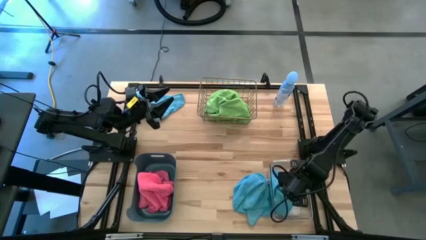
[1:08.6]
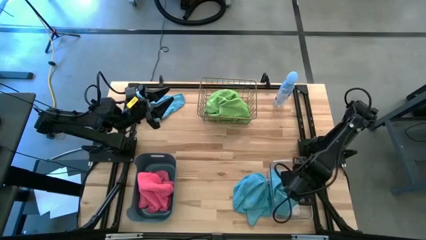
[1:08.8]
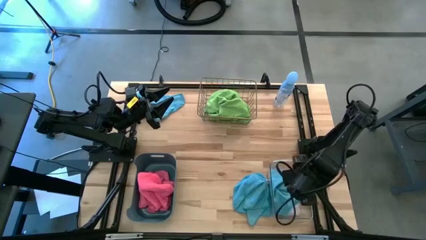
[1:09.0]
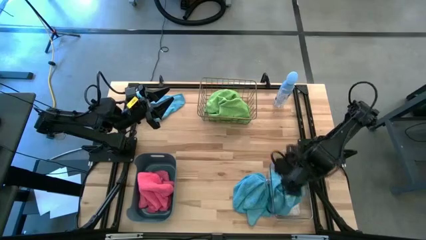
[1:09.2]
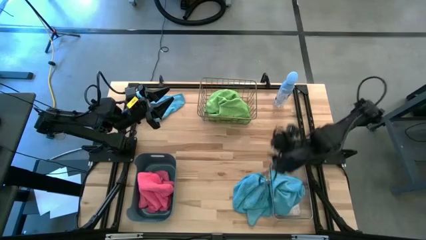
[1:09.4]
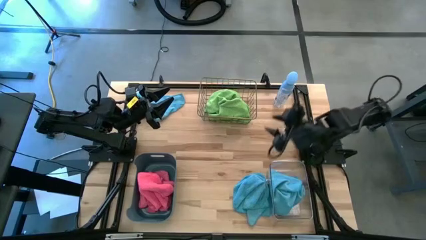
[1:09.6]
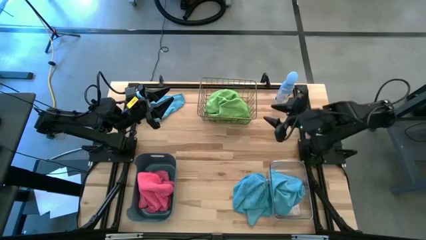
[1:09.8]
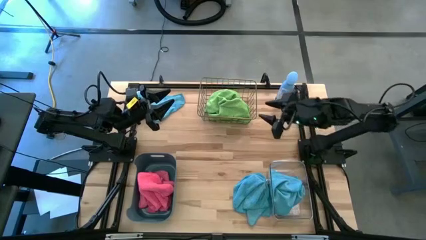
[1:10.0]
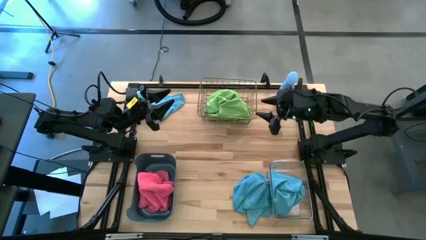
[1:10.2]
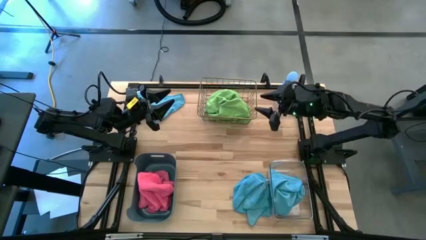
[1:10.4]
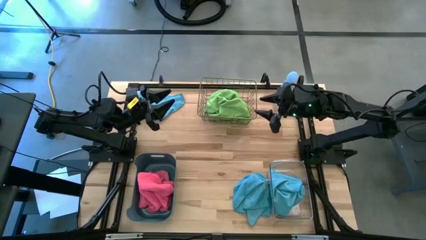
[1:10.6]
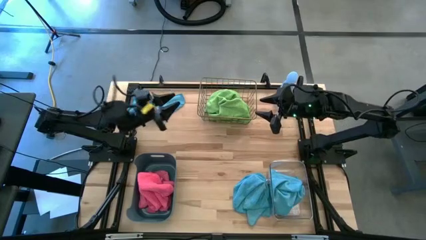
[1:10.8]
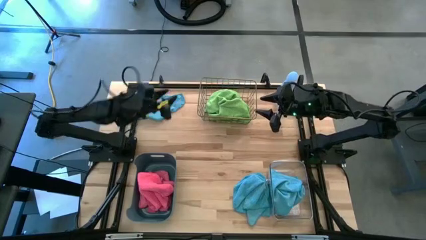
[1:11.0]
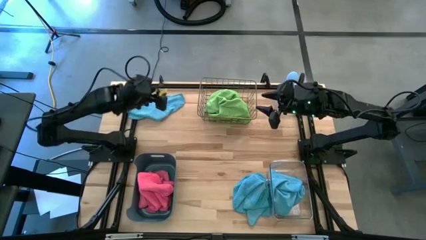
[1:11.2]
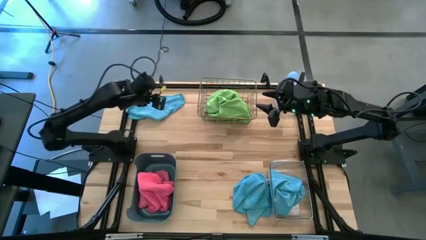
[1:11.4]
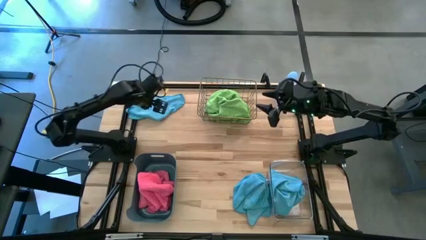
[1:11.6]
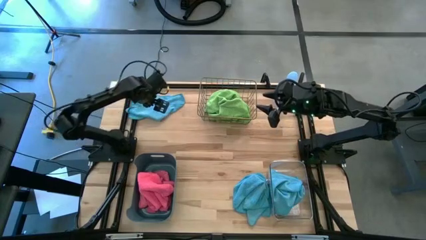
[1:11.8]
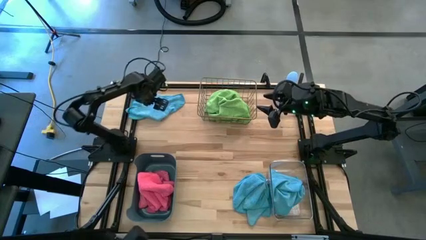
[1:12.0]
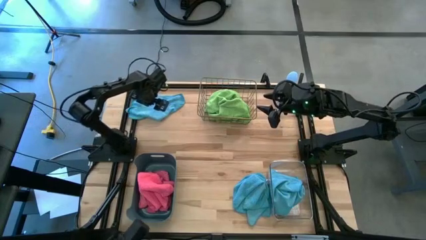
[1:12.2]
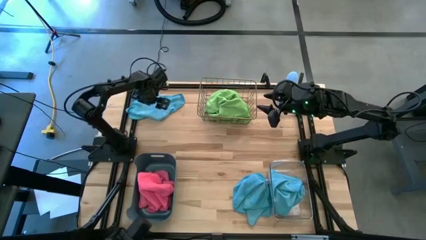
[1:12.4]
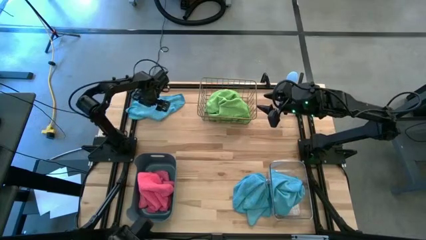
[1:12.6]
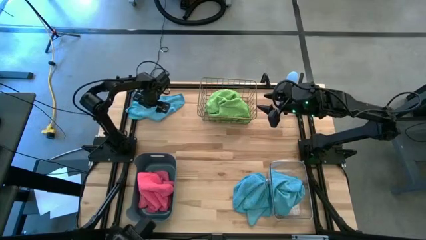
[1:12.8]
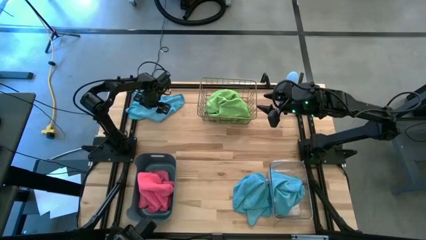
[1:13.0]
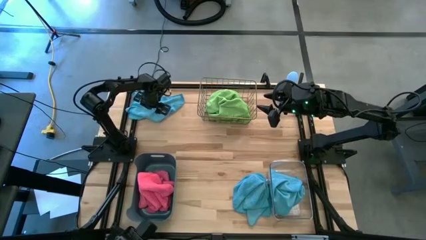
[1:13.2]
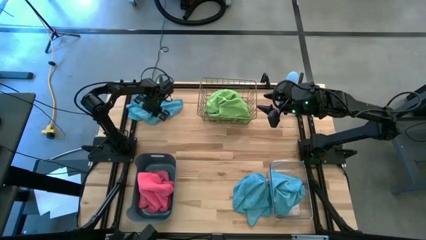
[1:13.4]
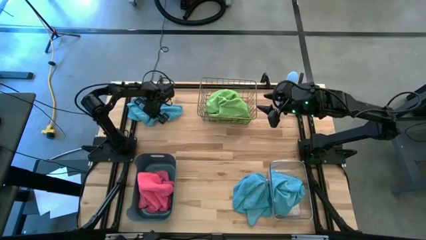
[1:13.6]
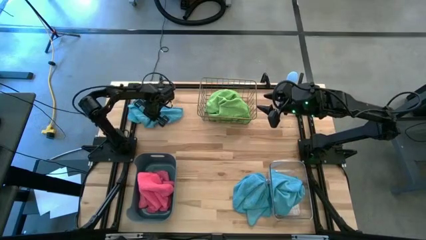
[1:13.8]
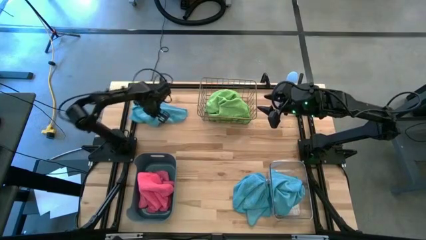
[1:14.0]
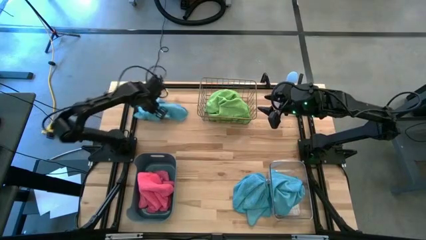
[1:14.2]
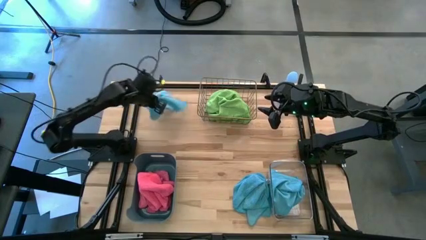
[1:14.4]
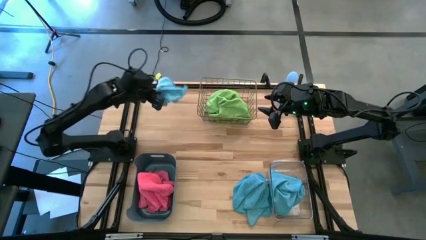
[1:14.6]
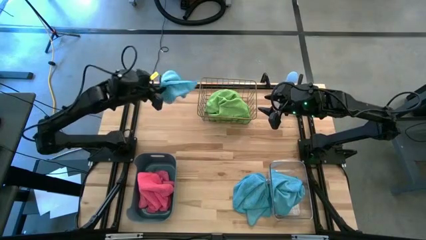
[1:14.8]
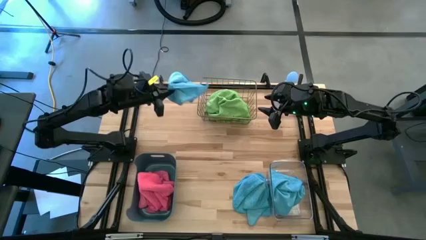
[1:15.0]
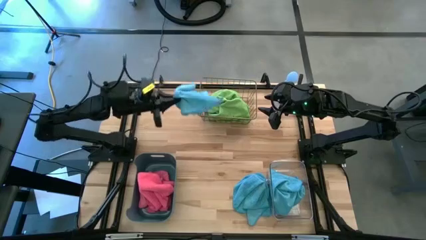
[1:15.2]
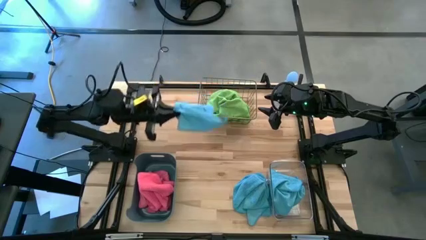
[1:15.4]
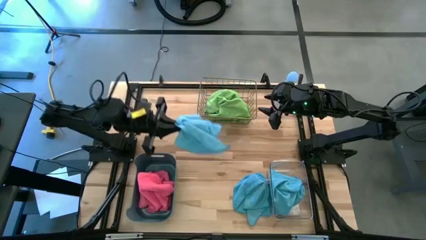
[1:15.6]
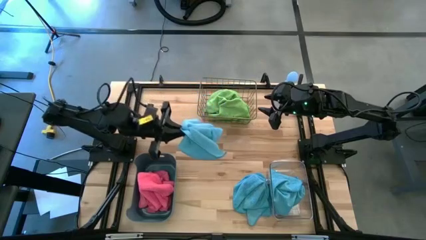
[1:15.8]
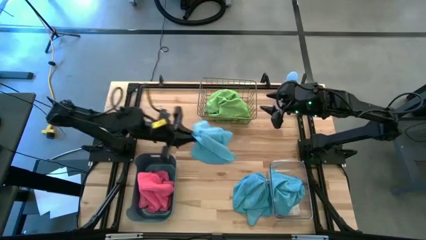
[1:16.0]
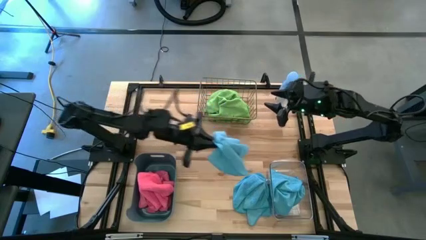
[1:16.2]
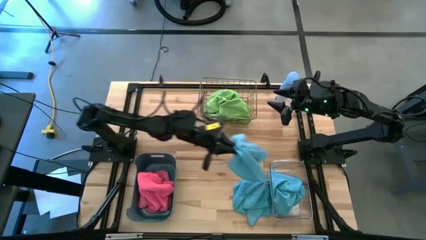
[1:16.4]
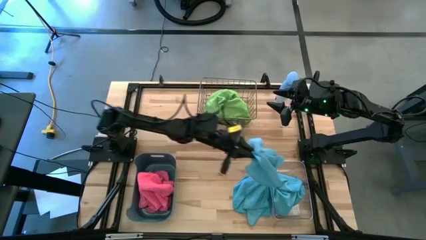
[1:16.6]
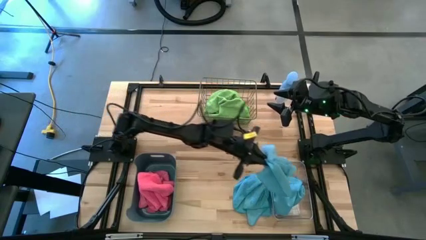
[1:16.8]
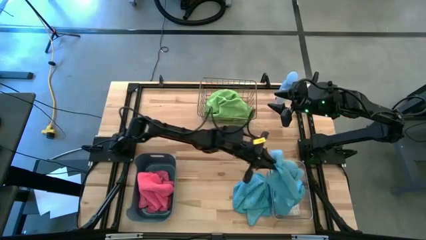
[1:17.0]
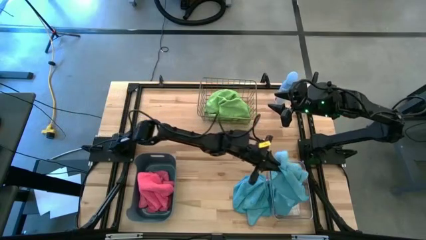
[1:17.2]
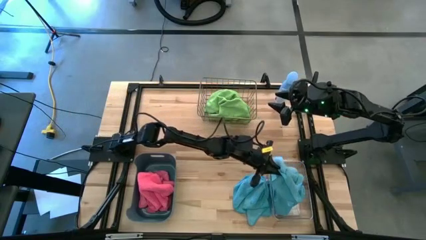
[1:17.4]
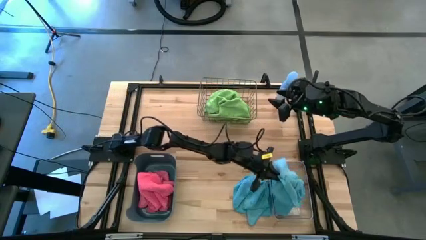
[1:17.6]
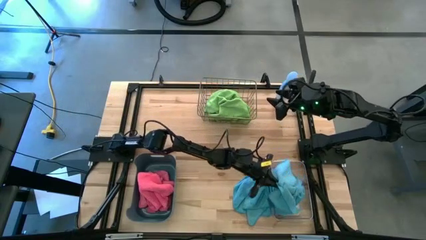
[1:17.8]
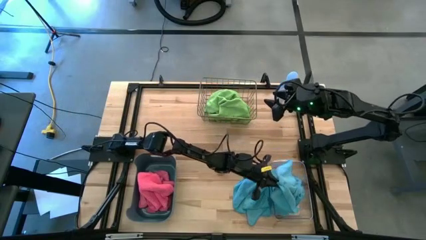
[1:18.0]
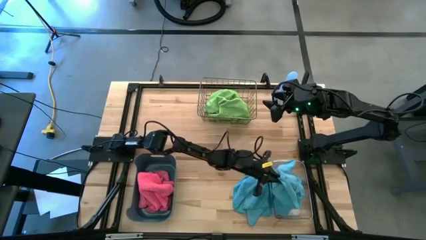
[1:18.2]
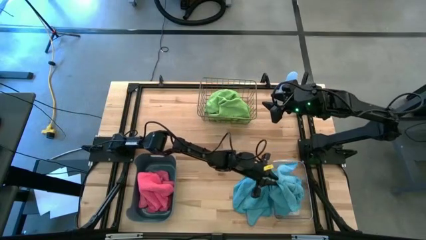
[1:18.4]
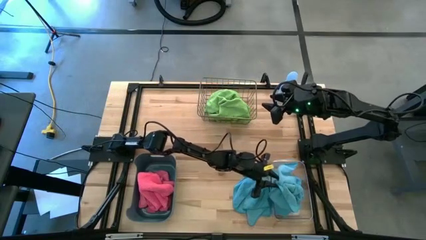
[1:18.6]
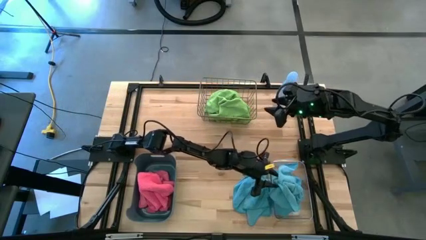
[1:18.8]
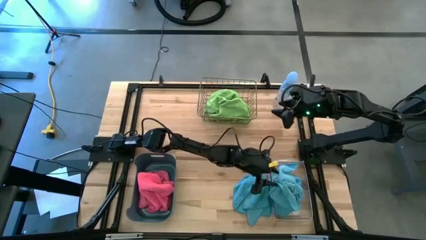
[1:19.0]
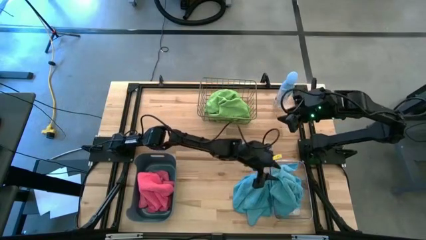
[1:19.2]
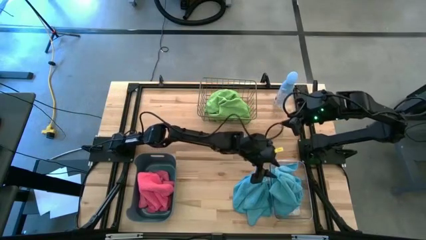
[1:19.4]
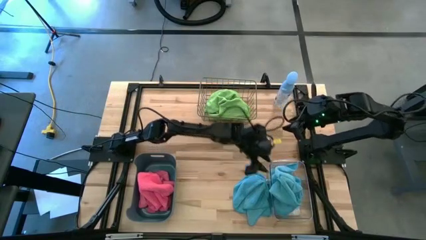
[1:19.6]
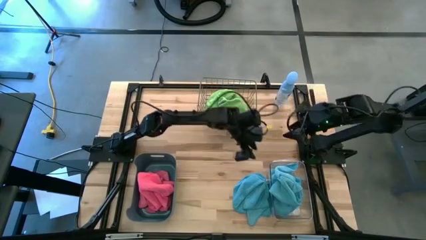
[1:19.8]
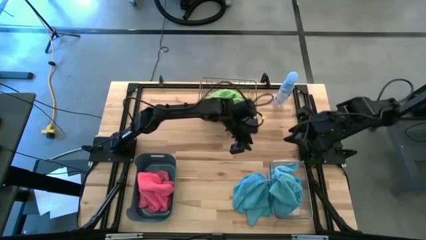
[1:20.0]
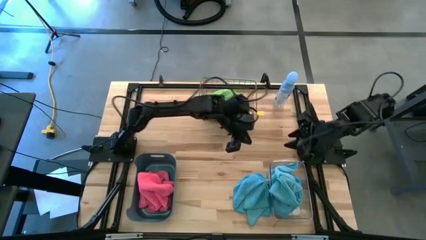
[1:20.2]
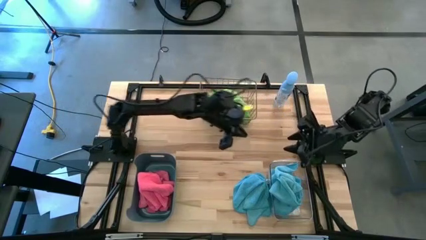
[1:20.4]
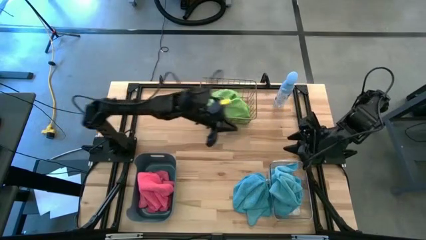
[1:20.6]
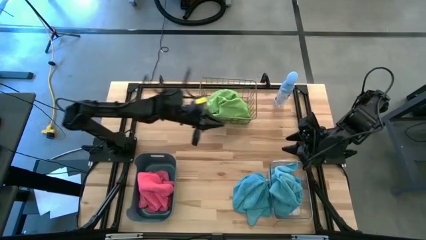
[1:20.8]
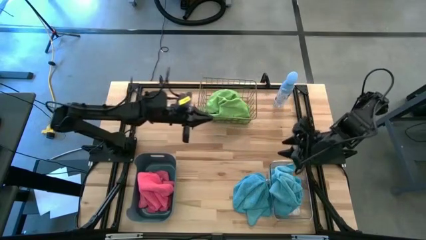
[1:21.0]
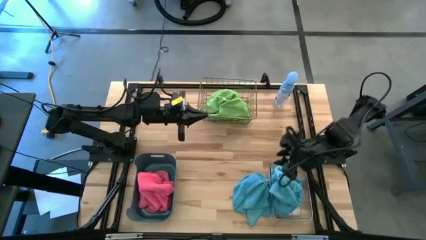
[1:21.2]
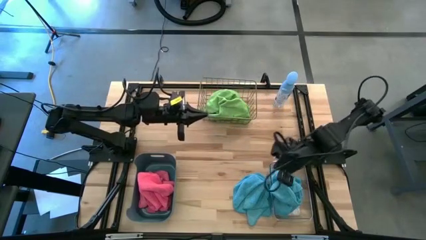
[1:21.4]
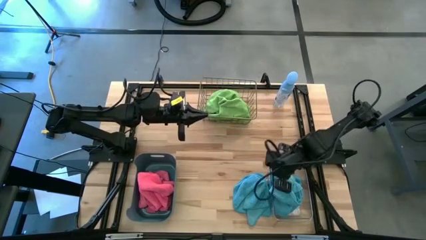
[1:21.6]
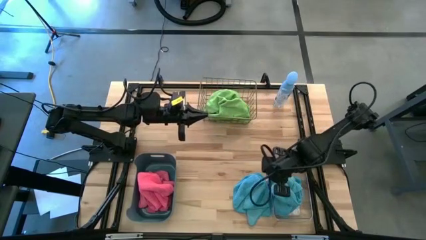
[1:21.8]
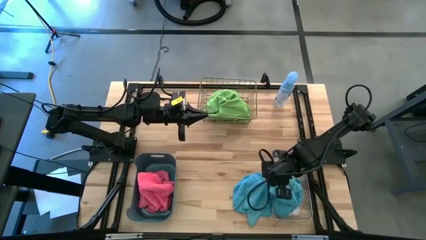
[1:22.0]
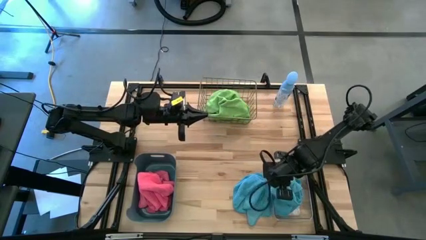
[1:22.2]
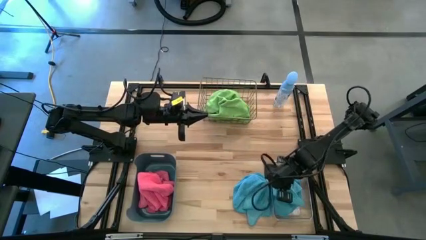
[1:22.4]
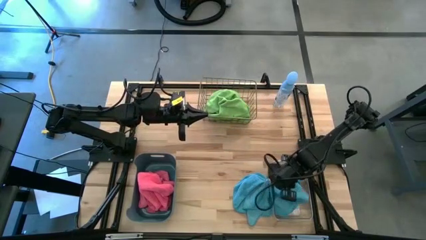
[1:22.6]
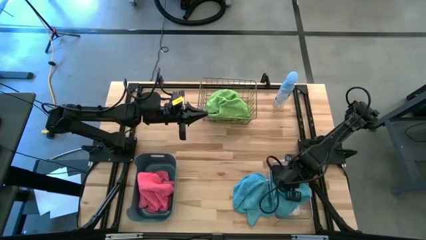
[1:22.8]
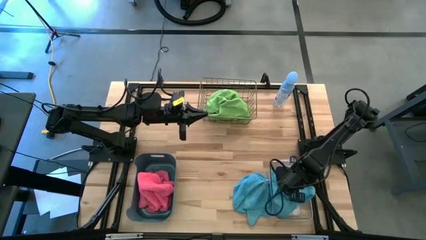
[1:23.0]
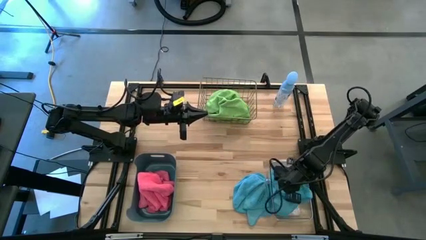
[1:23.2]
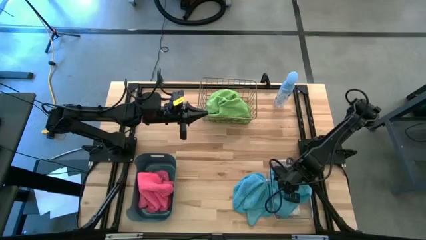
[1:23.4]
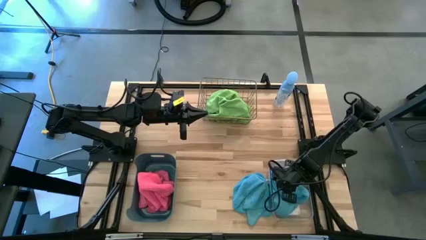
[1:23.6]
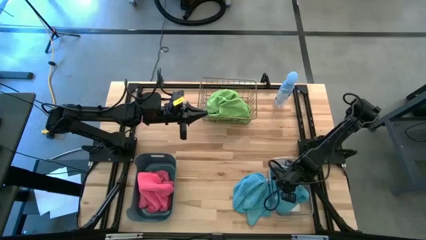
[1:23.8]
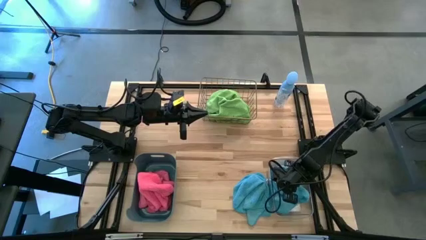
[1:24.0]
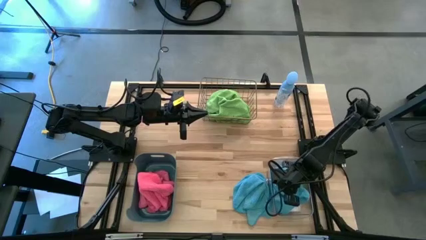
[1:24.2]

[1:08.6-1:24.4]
Task: Sort microfiber towel by color & place in baskets
Put the top blue towel into the transparent bin

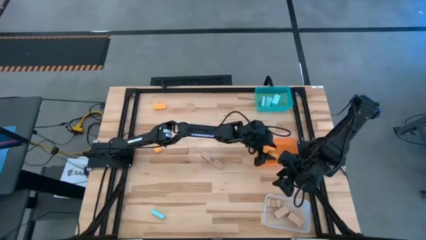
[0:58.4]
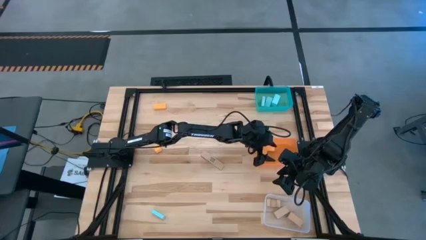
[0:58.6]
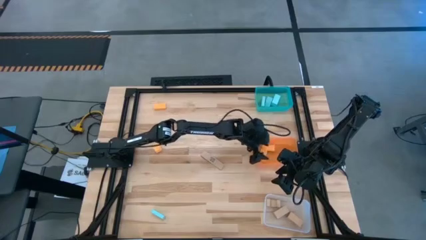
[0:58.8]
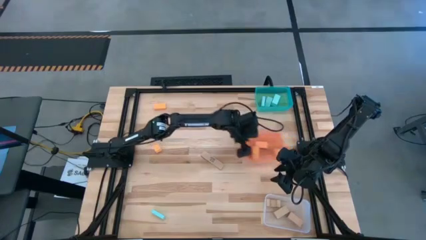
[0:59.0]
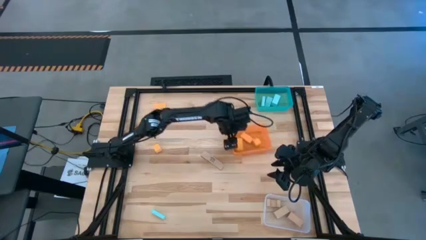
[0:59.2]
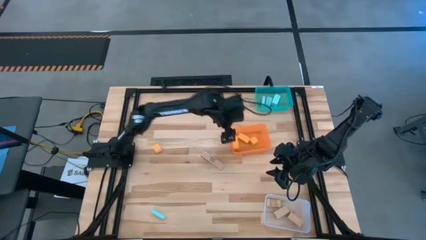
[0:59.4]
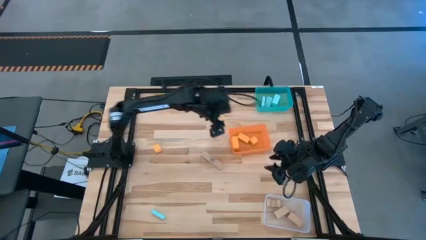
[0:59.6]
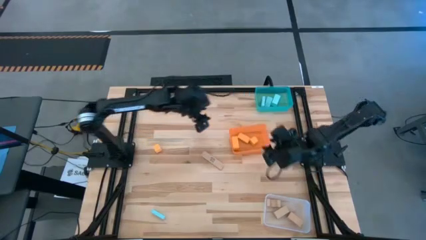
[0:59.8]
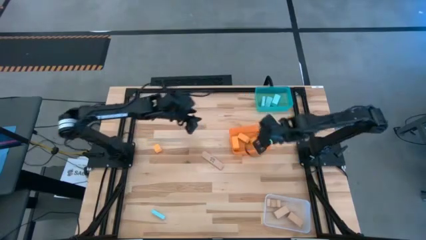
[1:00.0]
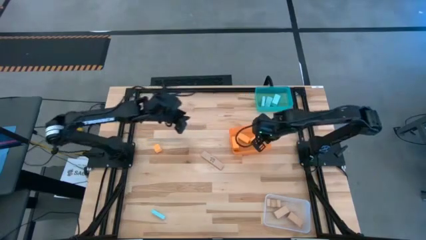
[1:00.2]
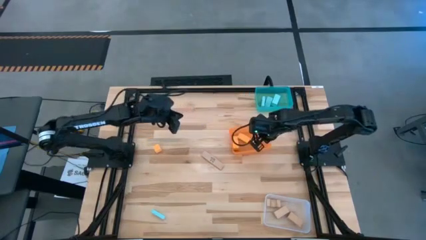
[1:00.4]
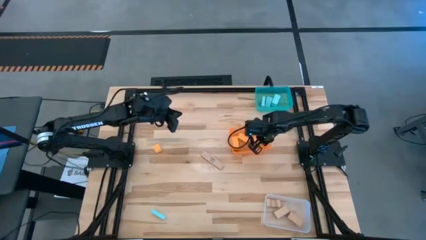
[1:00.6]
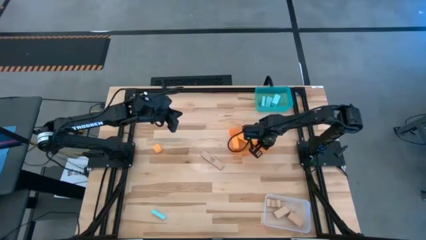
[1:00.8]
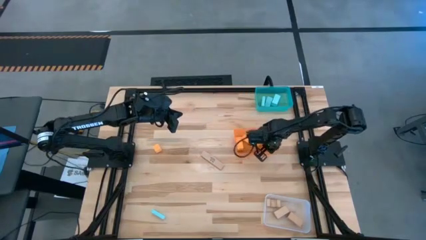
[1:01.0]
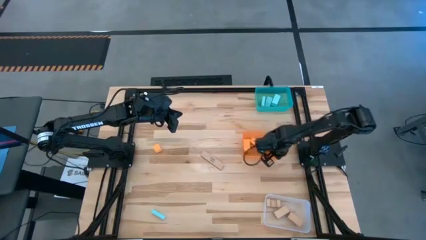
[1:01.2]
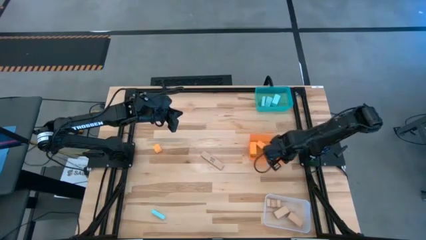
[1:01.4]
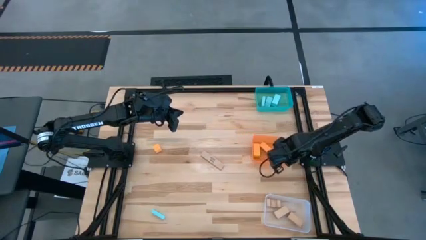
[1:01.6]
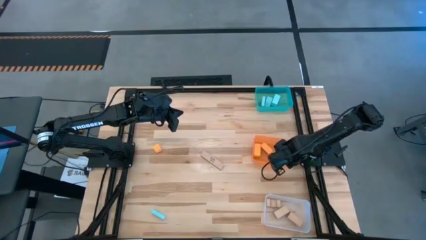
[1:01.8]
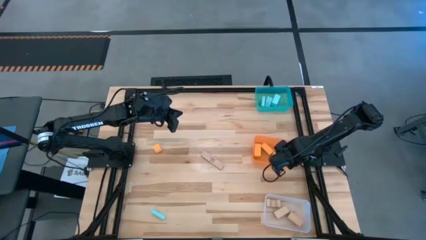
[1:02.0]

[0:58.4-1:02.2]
Task: Sort & place blocks by color
Adjust the orange bin
